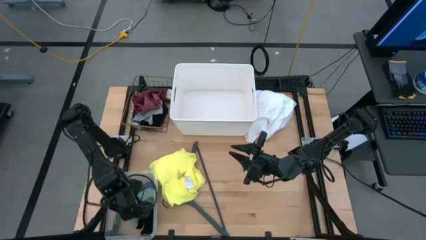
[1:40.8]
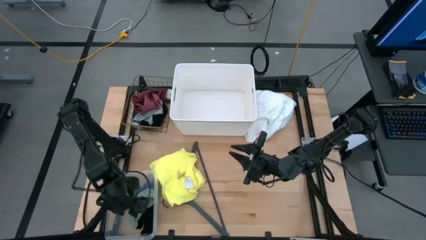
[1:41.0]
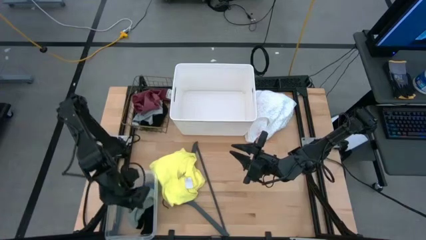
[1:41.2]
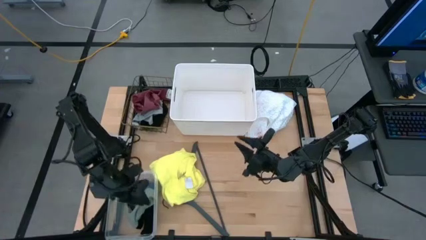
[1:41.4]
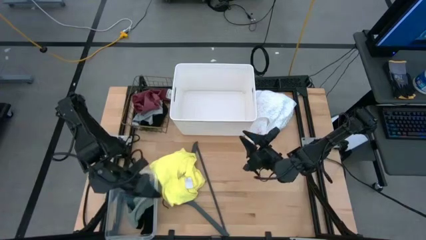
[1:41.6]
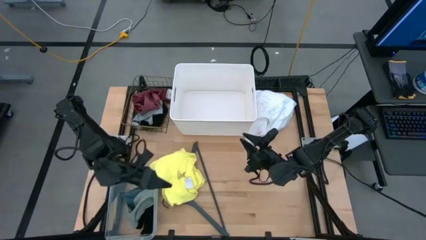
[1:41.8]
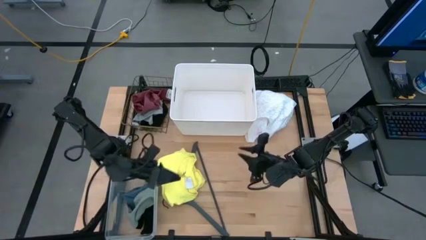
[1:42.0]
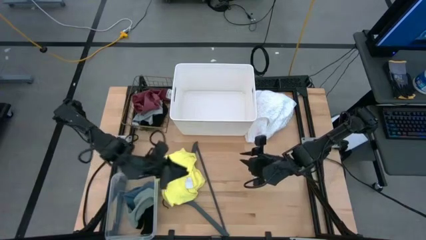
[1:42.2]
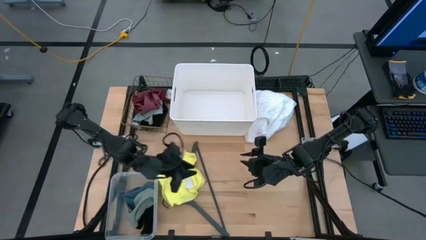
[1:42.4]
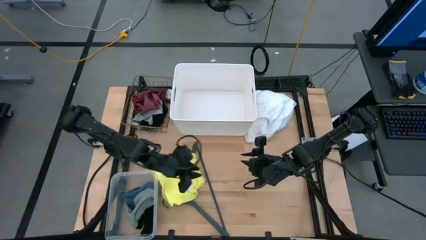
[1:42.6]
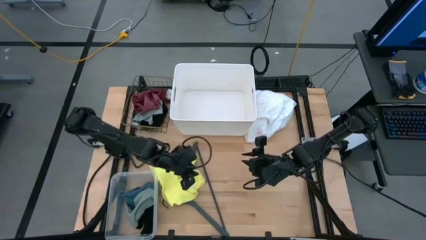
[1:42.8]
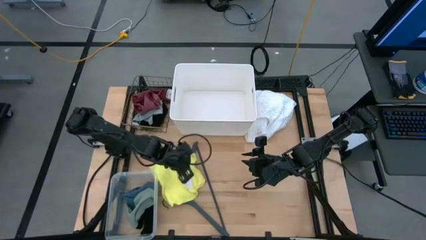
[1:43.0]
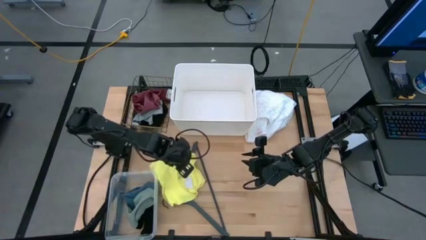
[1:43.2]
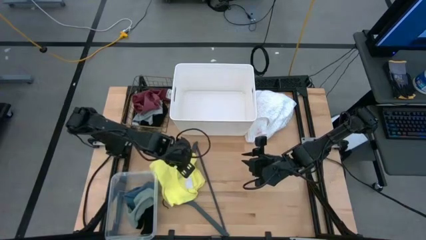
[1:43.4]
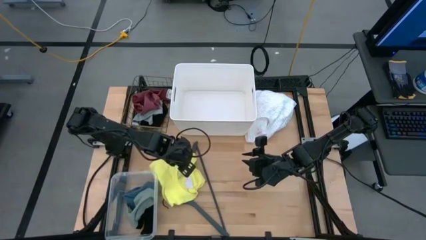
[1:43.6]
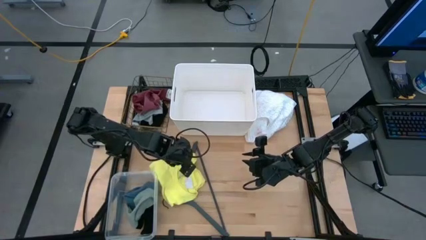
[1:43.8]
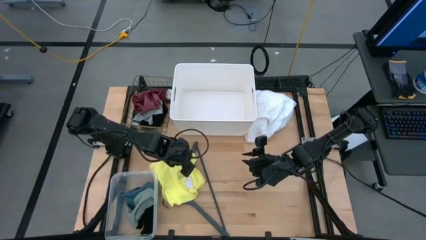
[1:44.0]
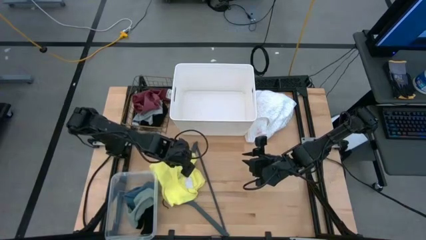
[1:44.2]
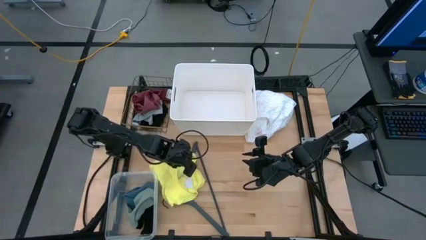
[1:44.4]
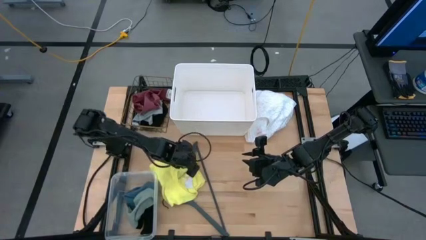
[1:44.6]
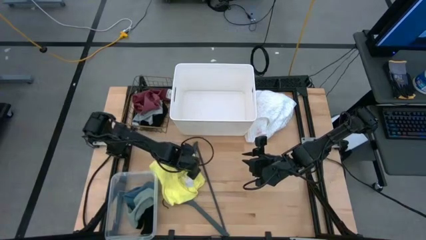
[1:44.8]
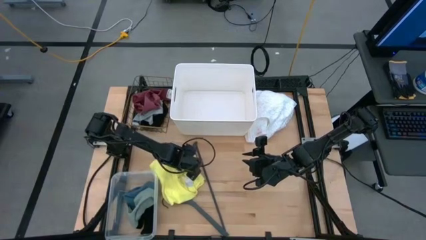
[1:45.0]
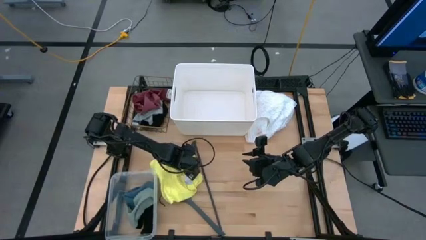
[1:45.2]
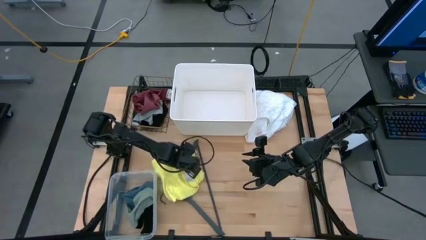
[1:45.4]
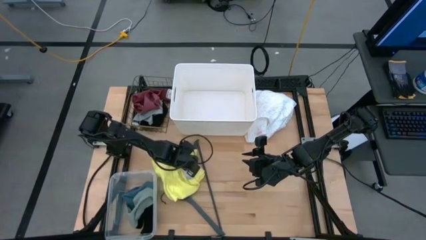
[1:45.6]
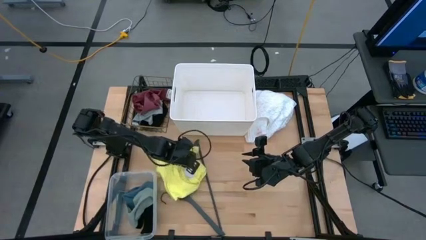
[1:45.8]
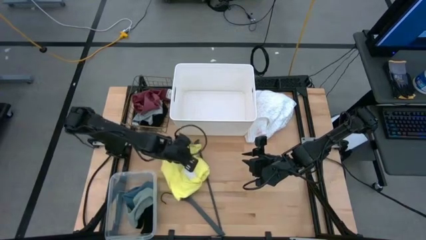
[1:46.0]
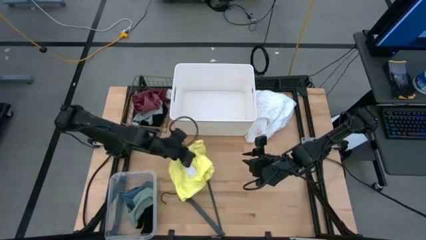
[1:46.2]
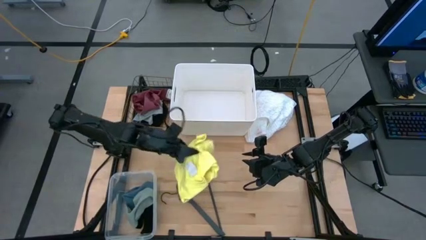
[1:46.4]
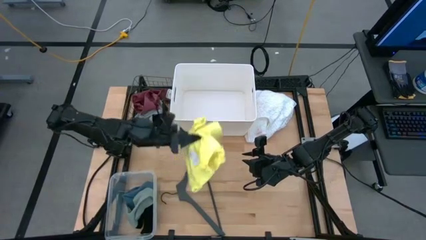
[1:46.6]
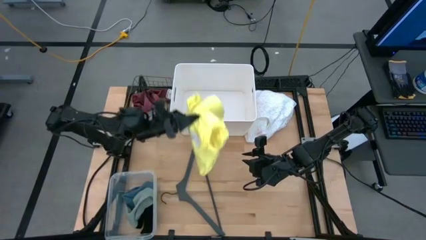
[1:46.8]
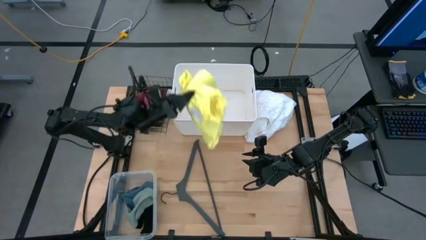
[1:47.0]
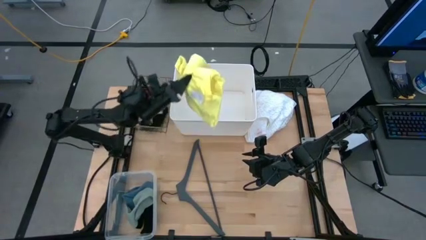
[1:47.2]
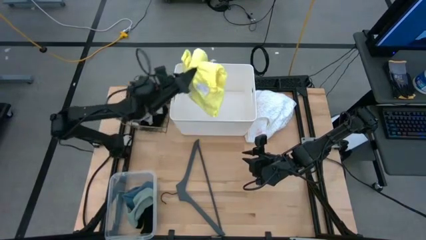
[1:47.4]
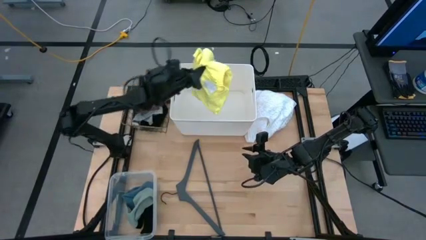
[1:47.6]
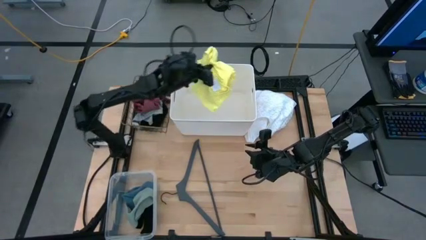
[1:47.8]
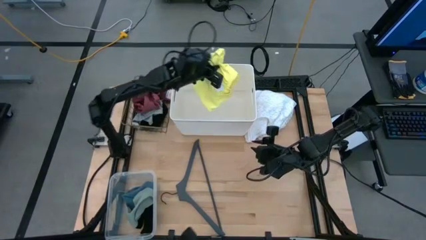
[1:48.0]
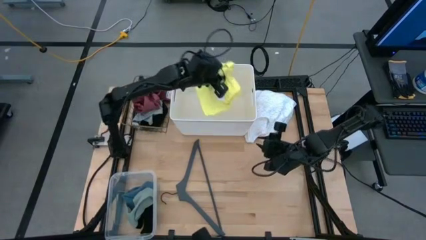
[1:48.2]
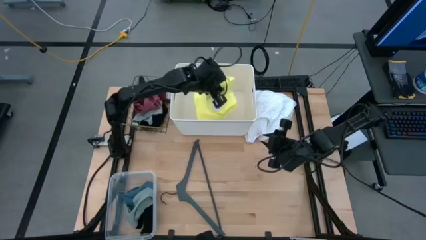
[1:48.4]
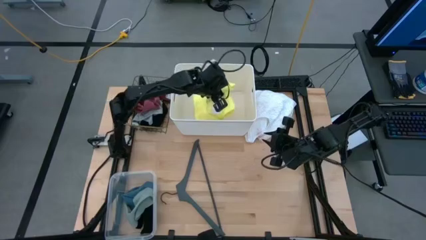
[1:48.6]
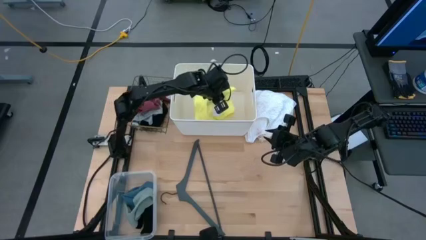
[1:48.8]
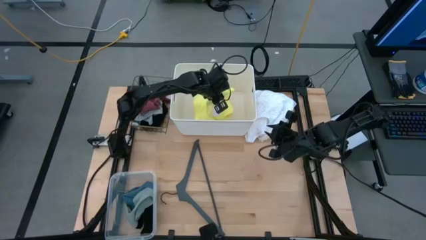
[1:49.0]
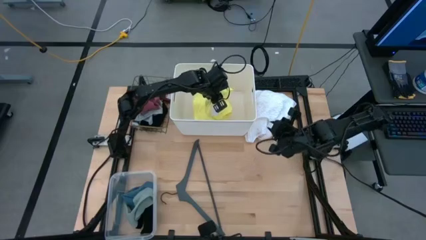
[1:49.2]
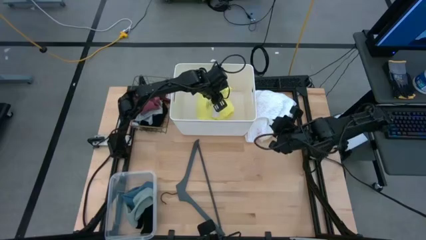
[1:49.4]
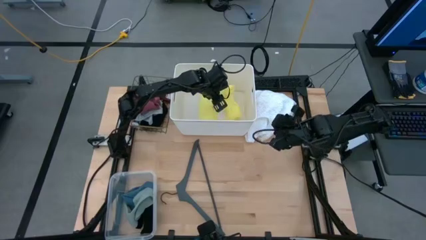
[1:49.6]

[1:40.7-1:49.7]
Task: Pick & Place Cloths
Put the yellow t-shirt into the white bin

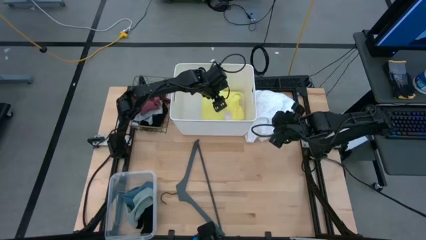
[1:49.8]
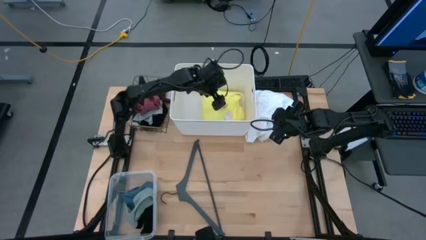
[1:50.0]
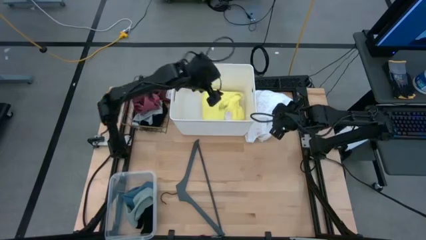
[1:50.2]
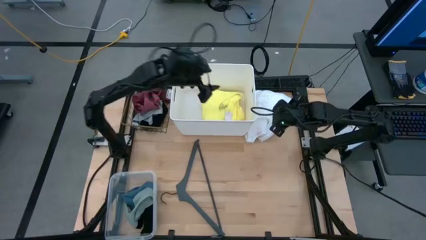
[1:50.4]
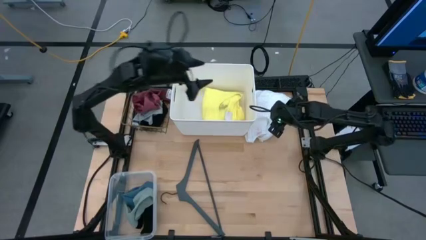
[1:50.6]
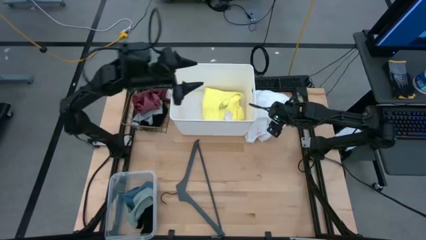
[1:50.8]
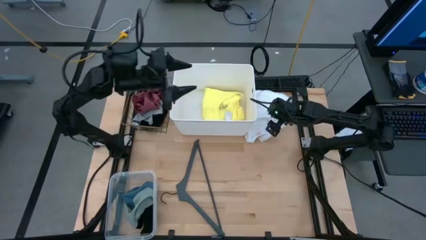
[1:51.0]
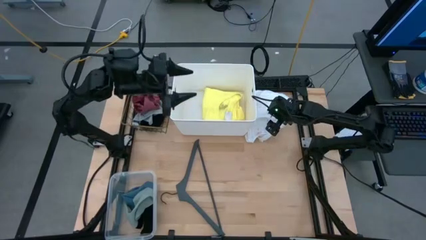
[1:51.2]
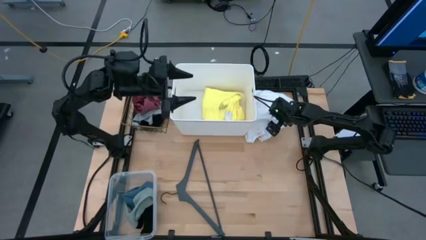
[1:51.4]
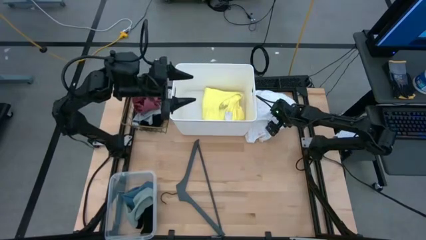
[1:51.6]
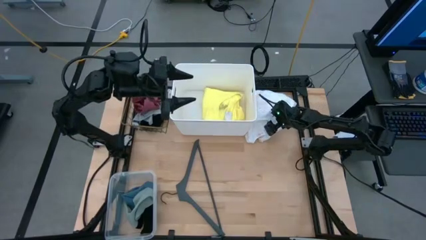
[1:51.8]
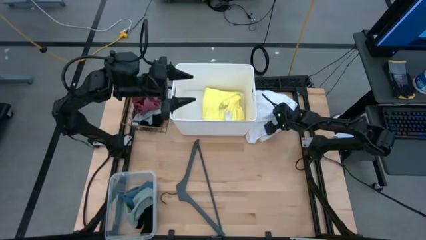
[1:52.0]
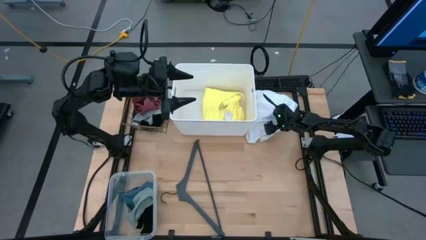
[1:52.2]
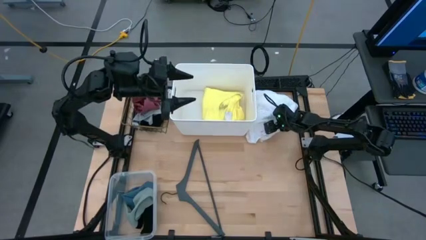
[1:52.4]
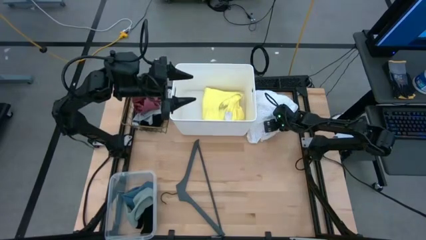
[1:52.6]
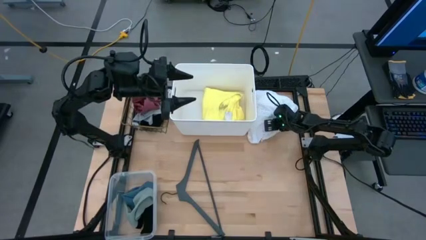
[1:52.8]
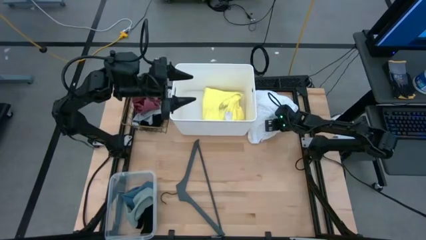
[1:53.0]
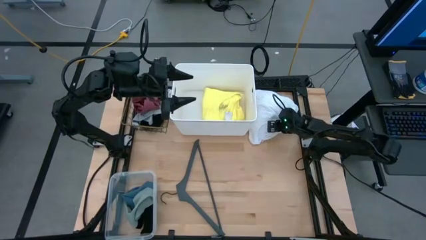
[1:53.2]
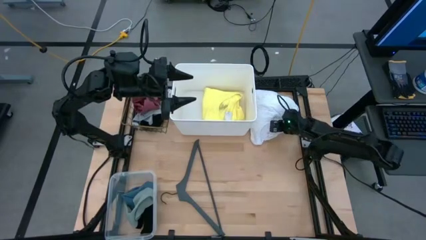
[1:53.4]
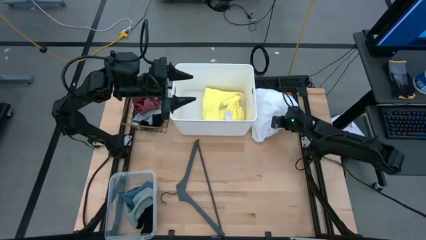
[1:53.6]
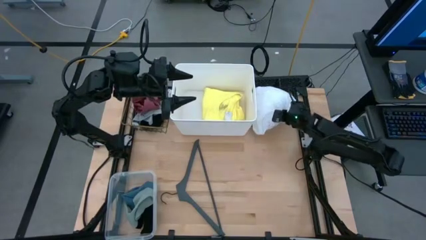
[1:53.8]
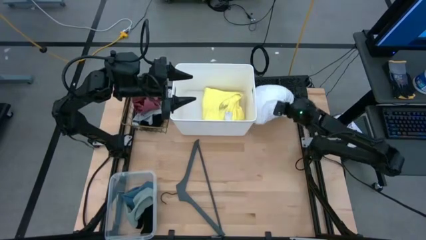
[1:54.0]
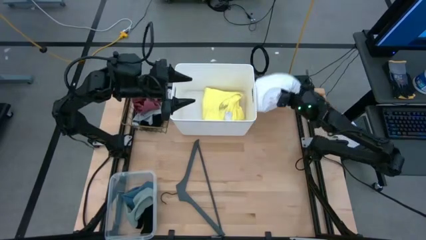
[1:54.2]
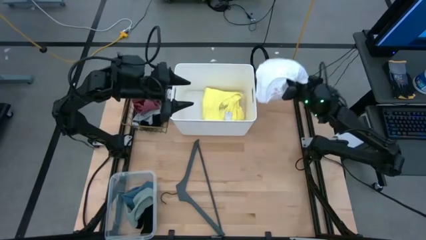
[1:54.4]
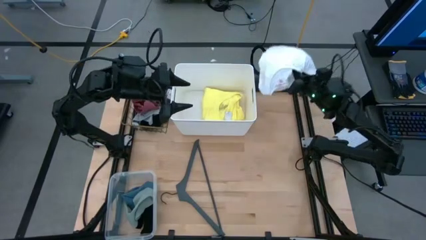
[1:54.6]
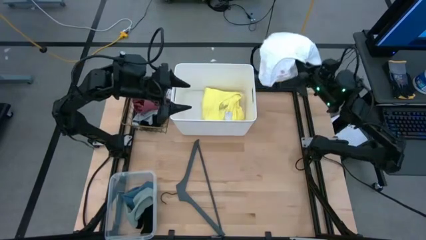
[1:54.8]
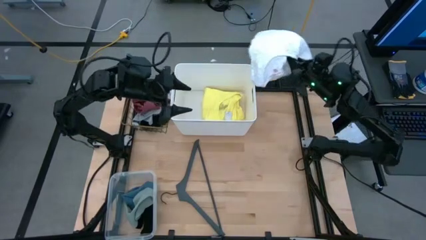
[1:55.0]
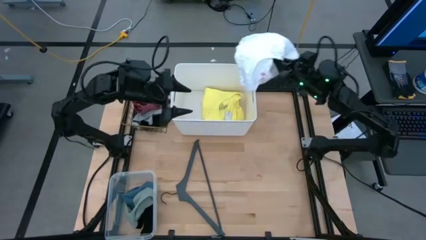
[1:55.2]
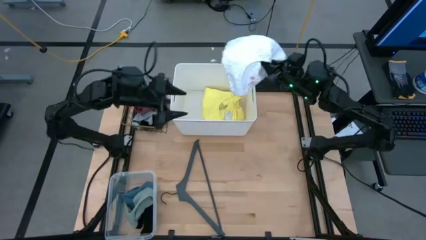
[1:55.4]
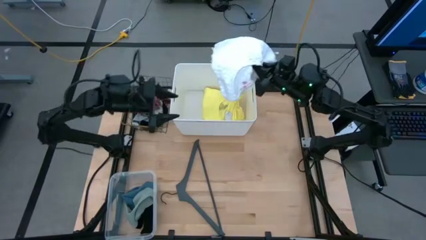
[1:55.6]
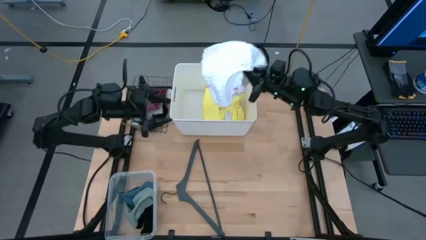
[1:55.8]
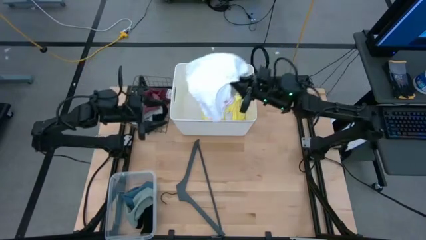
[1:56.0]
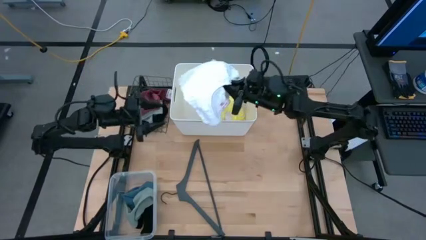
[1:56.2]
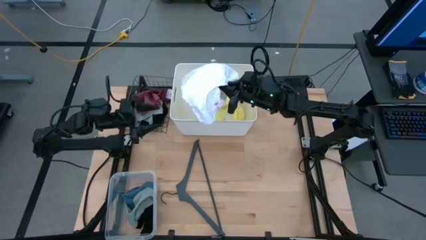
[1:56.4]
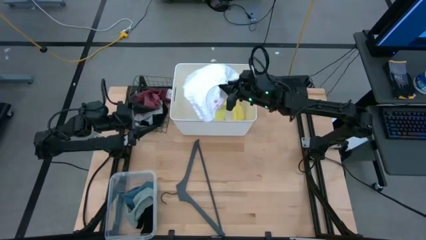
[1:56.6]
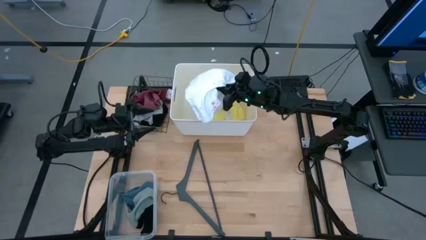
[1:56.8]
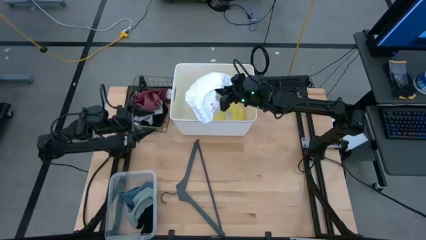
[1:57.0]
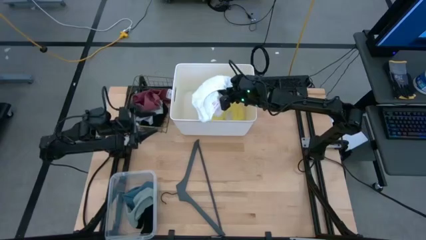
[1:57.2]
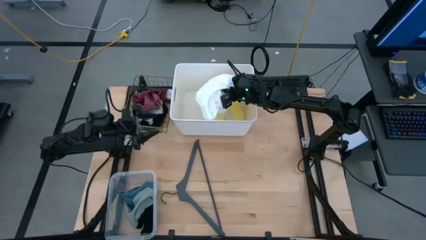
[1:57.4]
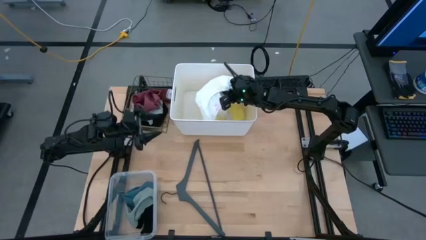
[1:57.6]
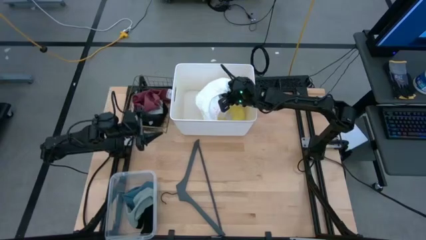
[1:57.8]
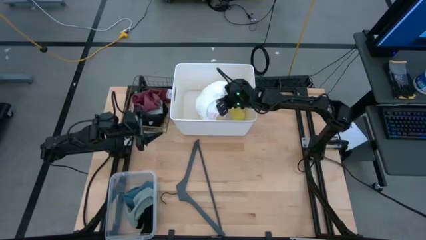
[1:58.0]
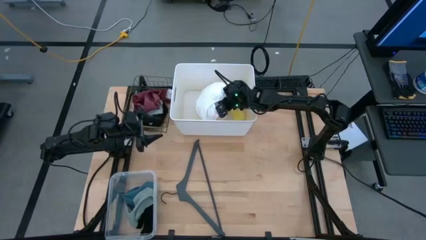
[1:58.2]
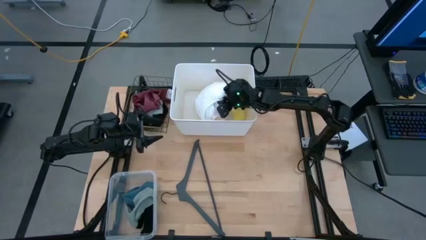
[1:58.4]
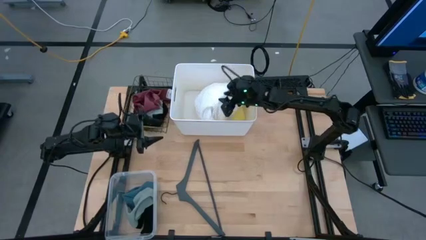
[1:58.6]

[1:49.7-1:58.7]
Put the white t-shirt into the white bin
